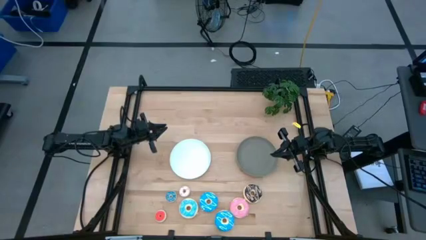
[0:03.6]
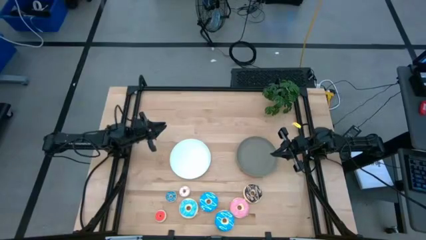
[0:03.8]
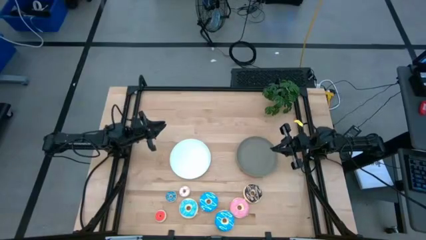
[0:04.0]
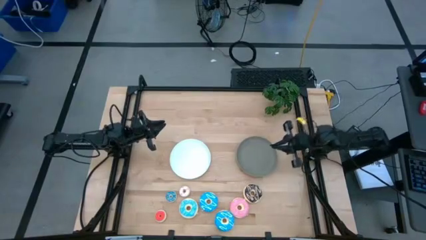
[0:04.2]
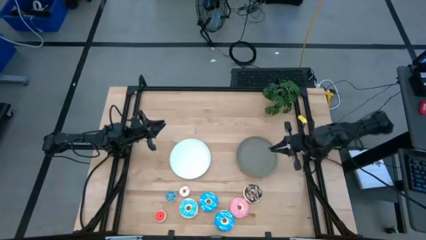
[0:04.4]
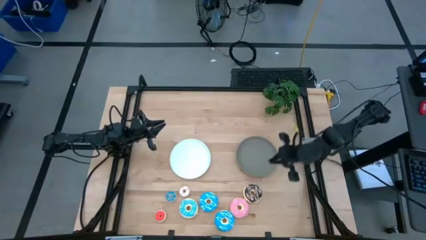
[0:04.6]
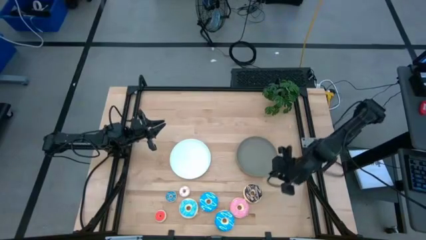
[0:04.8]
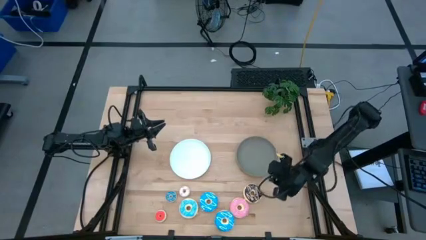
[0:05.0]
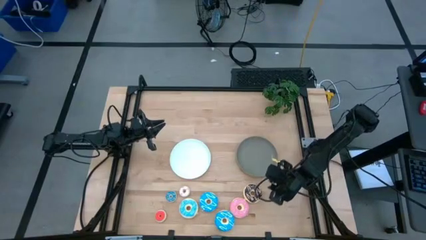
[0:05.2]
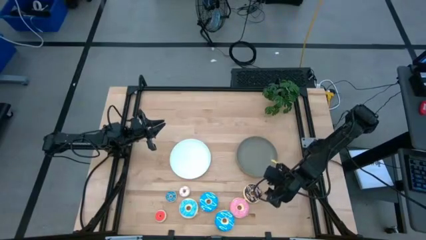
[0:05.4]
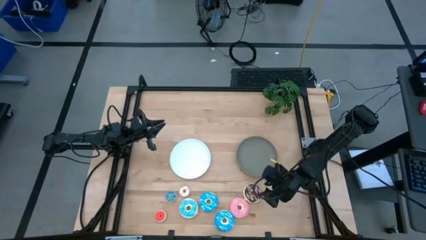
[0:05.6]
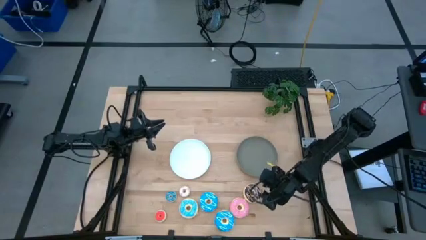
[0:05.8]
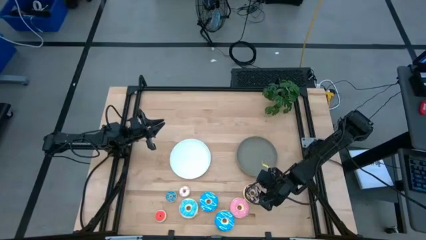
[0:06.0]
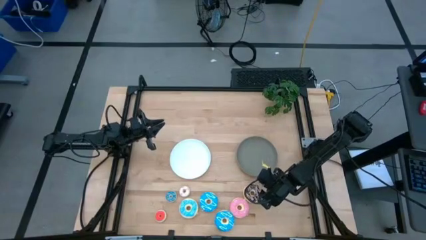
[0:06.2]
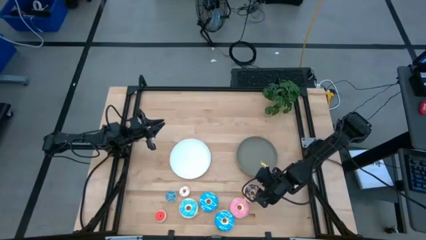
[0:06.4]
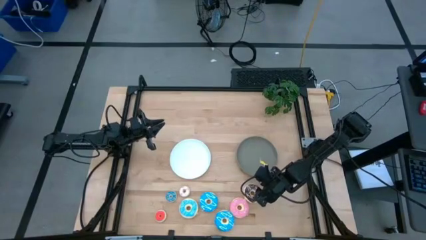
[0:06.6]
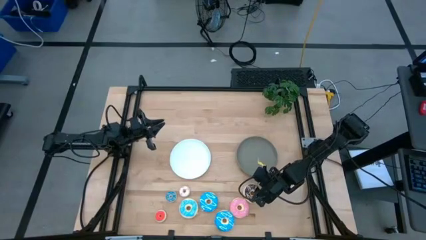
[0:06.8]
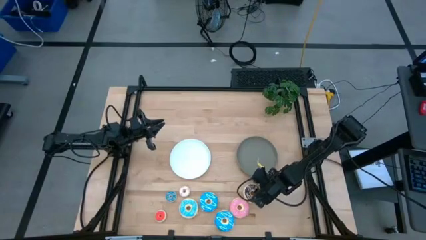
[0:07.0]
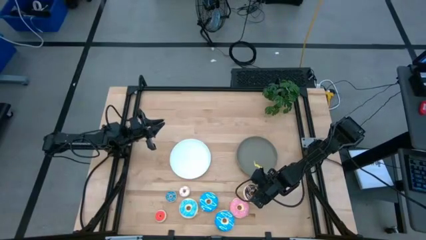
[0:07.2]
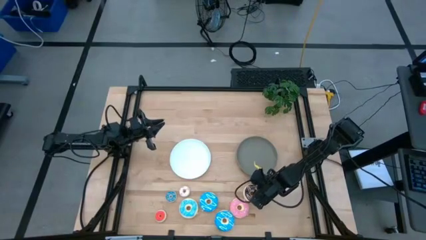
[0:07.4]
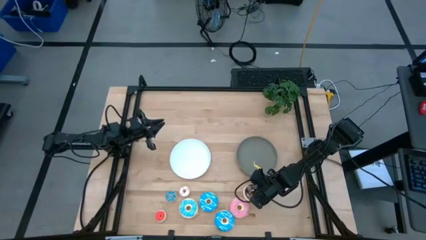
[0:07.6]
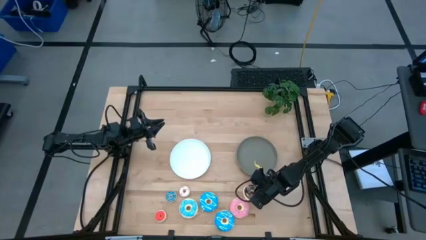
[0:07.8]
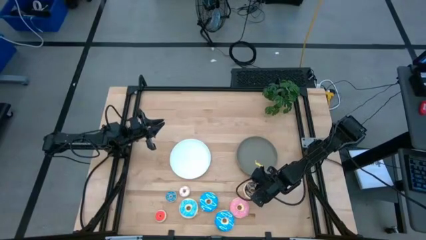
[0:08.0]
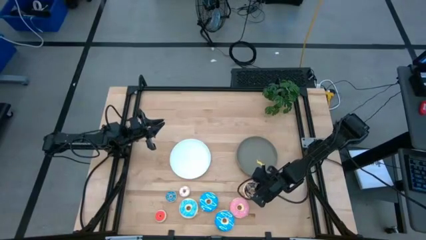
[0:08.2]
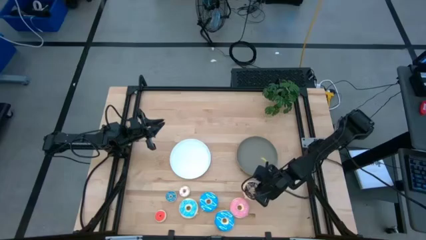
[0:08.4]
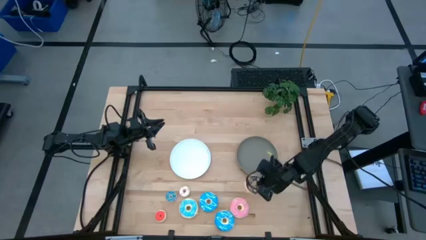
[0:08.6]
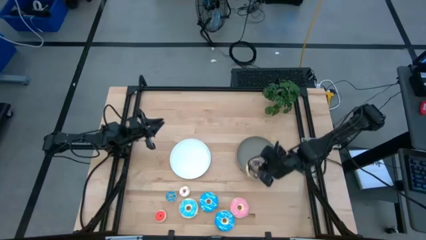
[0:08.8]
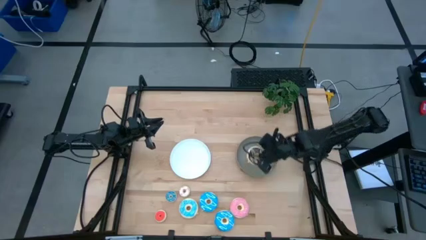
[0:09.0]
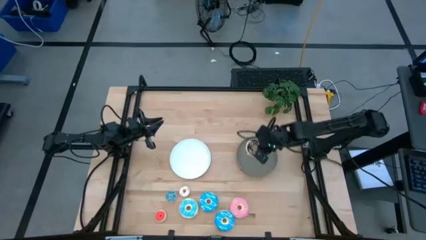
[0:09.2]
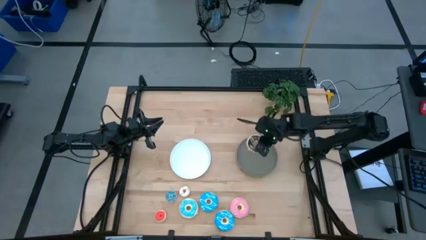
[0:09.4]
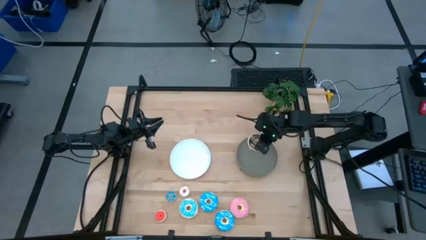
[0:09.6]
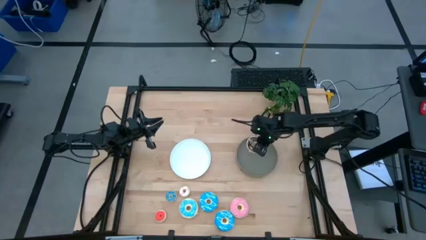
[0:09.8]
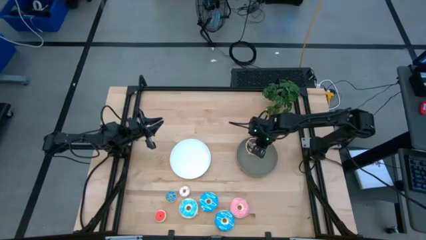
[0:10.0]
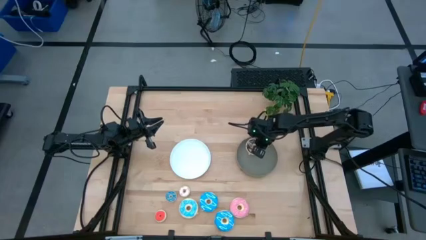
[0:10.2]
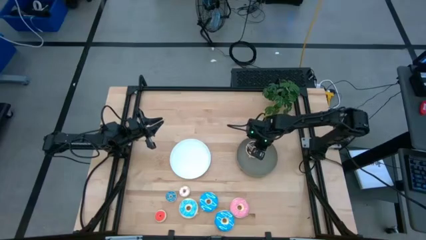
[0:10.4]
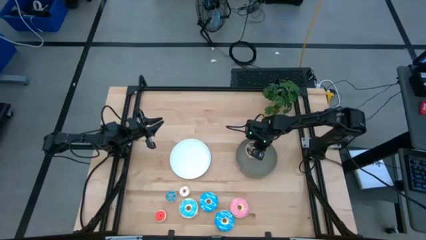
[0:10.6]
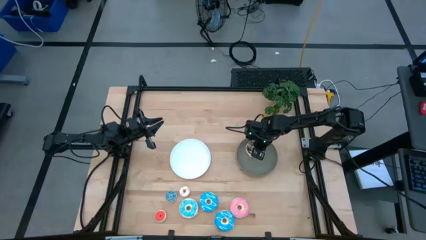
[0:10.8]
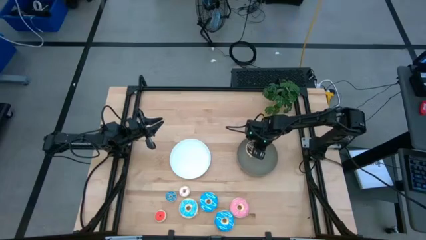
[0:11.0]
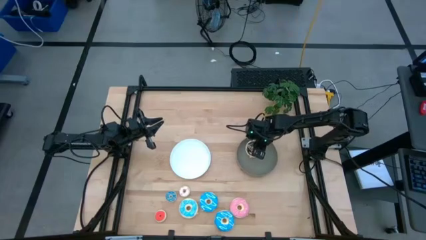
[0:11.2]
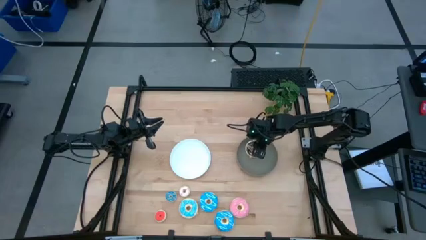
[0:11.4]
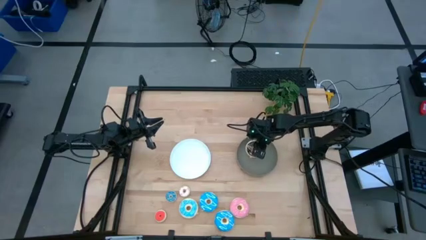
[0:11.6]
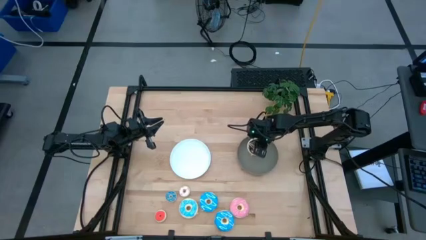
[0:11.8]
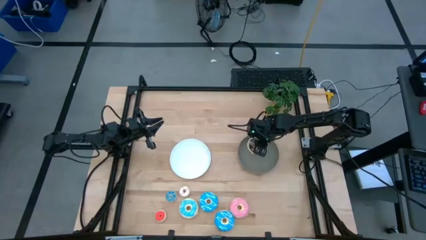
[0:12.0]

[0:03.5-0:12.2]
Task: Pick & Place donuts
Put the large black donut on the gray plate

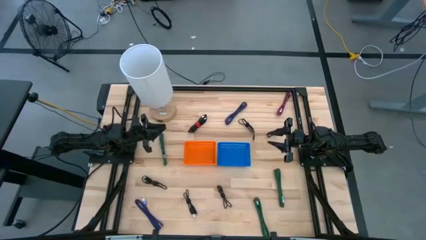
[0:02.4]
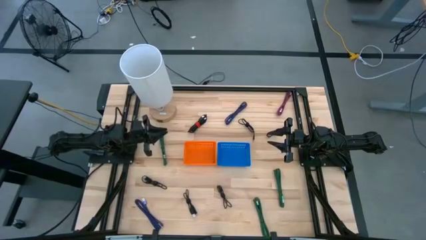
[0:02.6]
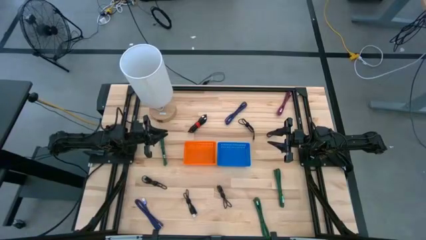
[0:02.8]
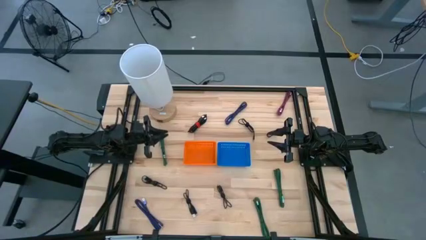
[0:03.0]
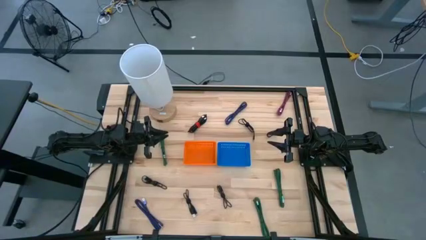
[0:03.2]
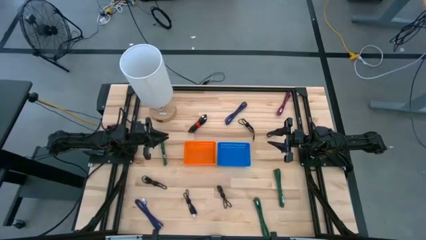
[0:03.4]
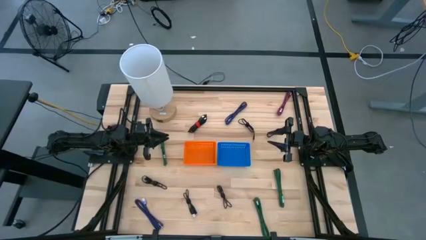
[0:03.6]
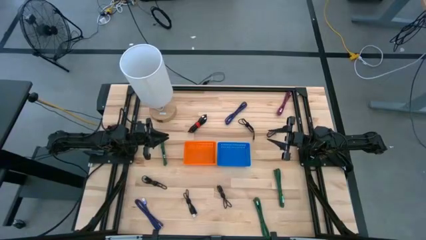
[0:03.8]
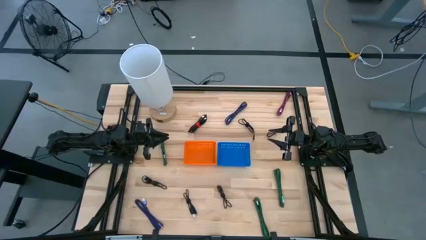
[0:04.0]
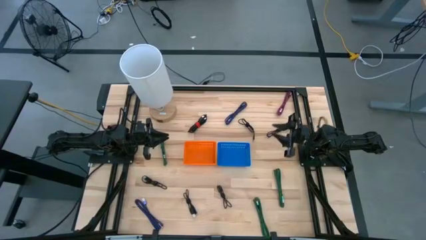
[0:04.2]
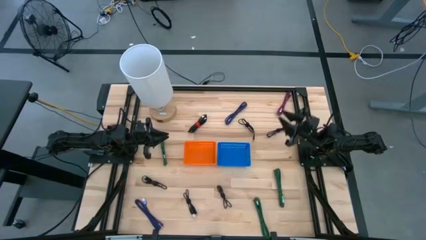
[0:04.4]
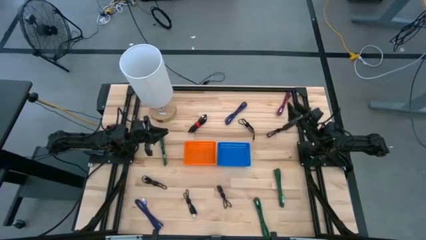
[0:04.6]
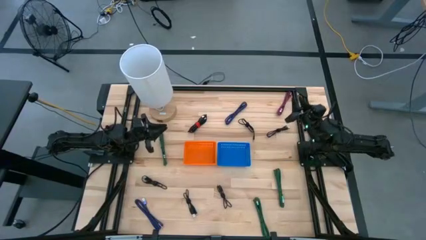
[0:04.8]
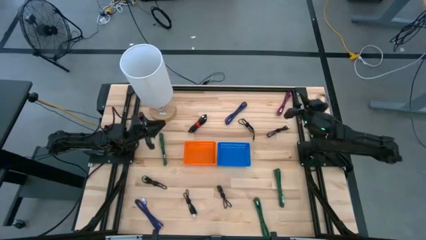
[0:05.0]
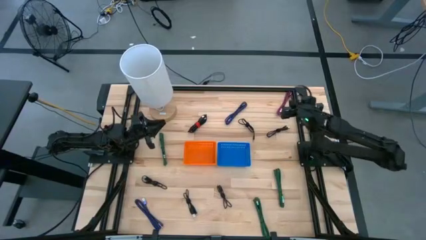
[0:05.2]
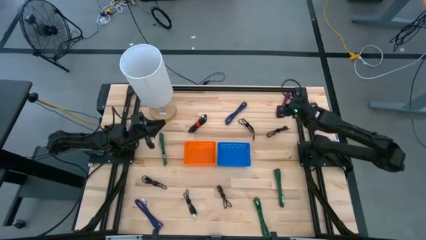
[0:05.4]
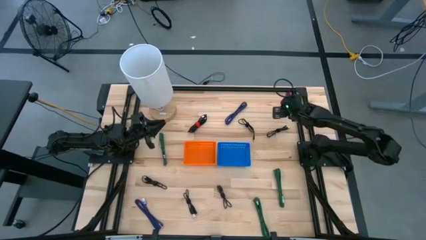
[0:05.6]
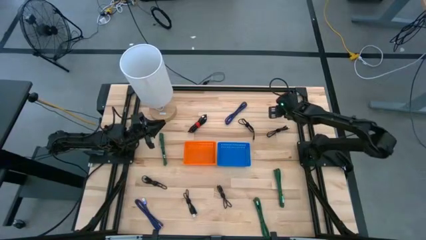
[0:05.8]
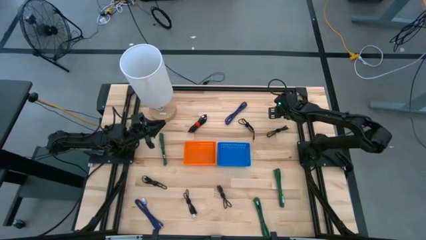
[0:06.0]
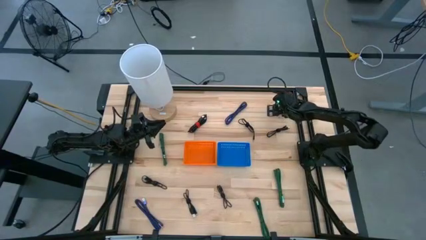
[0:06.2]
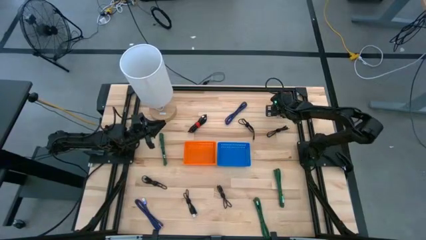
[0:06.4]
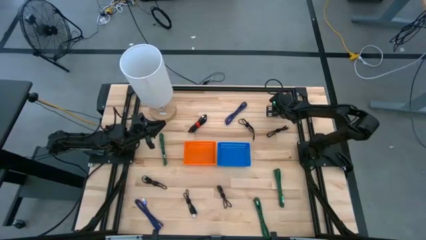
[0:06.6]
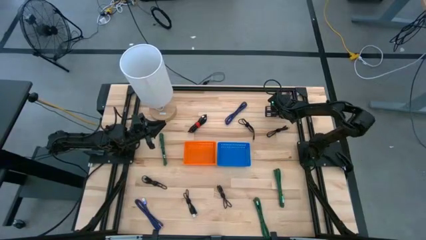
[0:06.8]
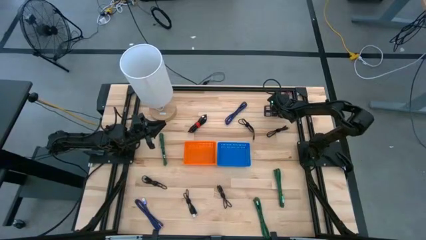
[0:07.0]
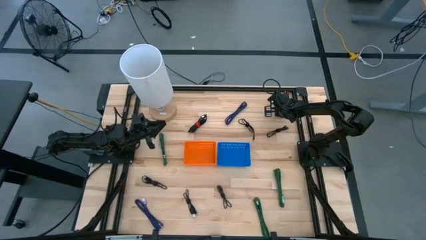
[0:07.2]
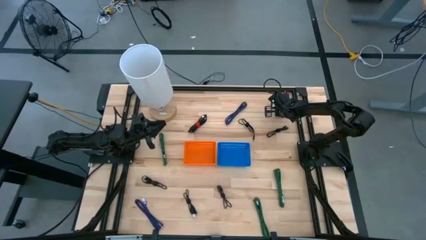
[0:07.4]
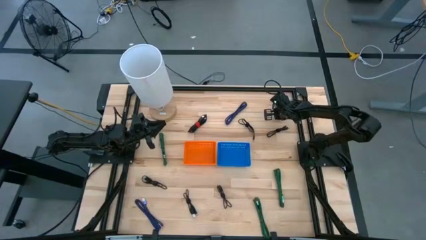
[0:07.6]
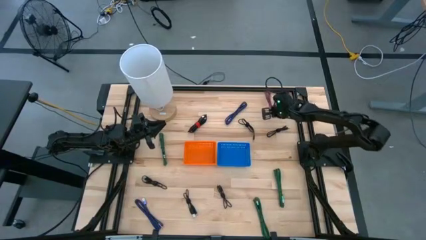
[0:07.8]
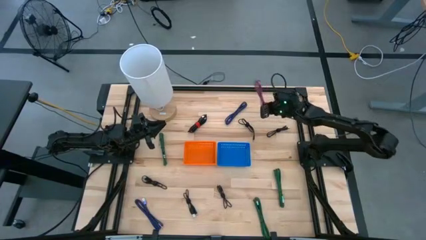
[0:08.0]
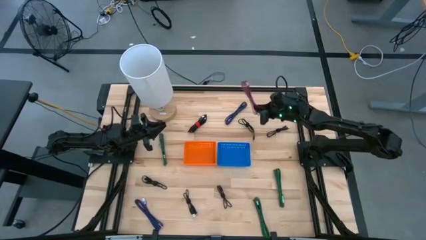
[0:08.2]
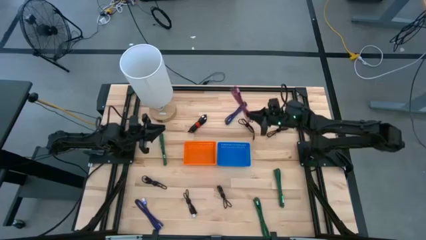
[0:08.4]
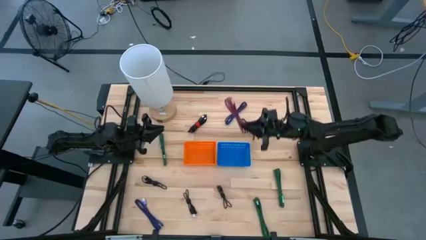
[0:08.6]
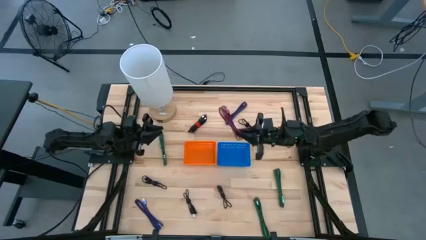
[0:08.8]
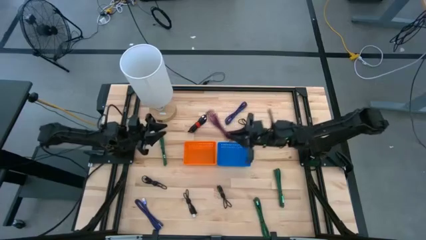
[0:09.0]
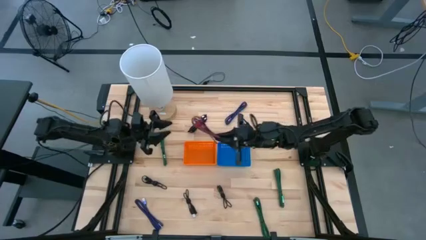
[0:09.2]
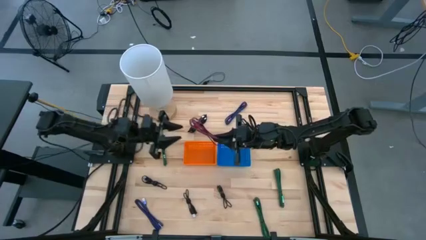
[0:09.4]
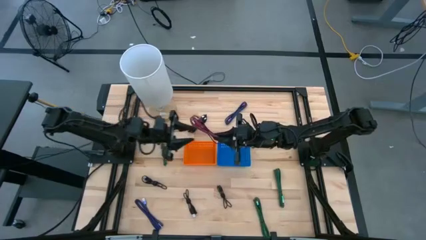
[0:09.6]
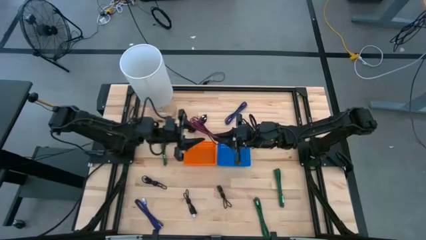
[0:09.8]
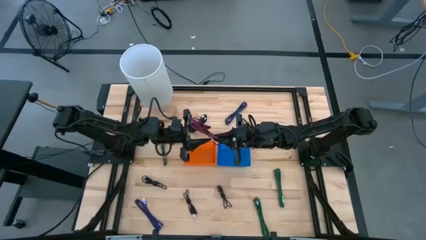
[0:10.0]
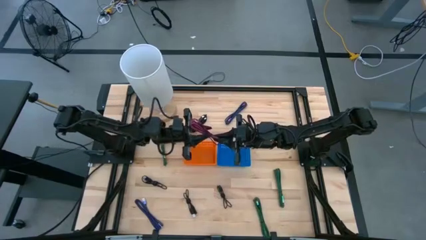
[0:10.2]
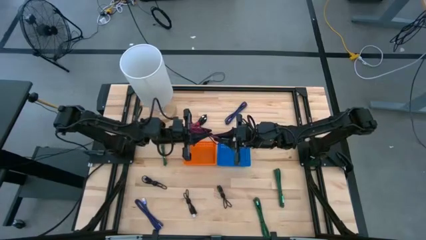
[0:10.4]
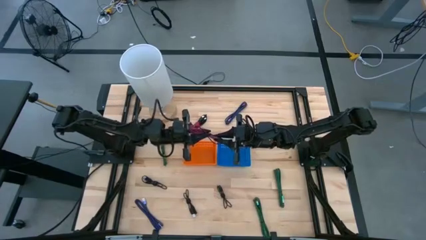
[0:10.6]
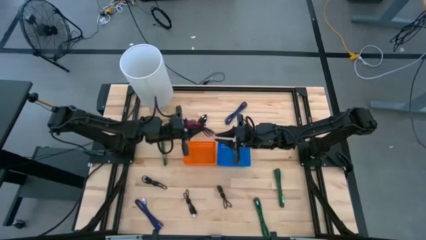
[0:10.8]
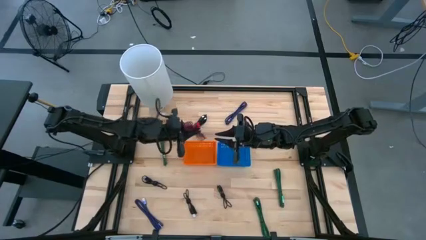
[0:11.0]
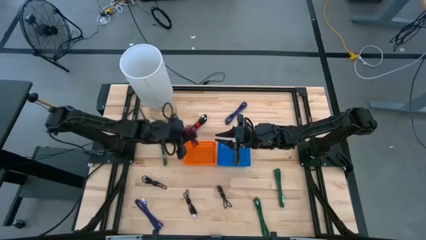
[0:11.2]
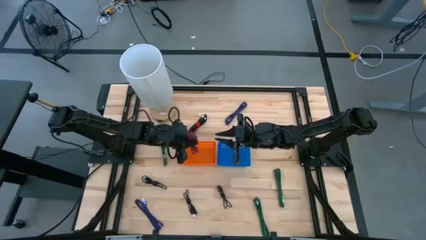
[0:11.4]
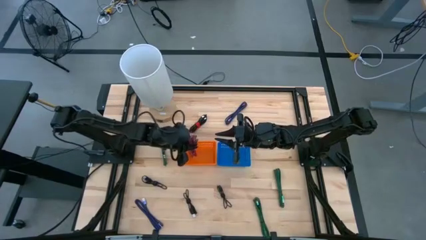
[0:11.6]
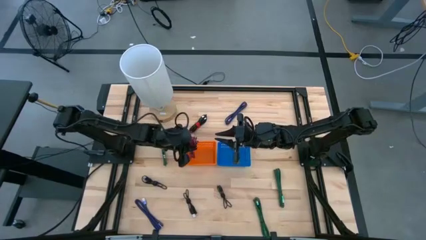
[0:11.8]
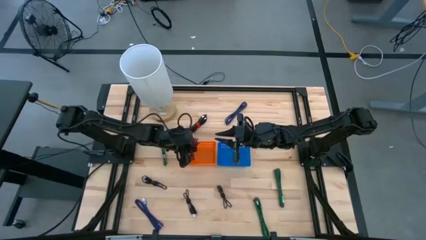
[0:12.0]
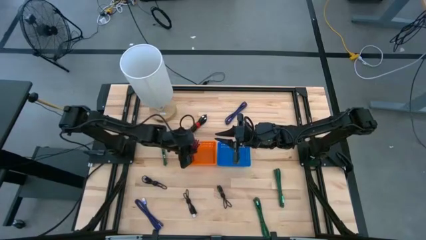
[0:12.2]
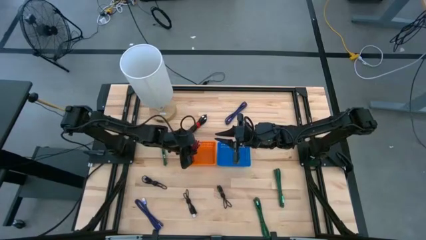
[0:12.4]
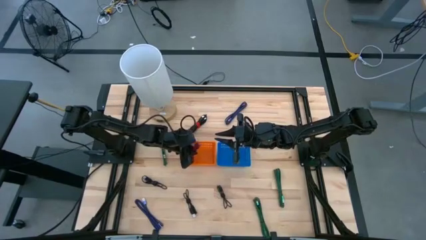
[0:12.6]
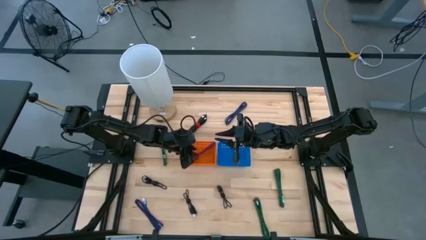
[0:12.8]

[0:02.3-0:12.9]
Task: Pick & Place USB Port
Put the pink charger cable into the orange bin
